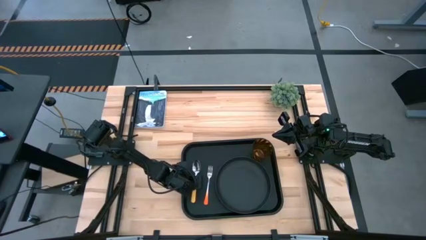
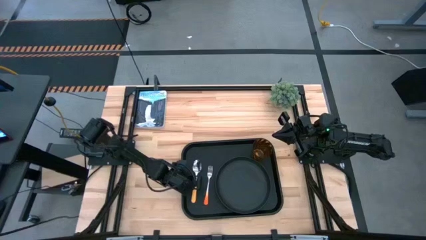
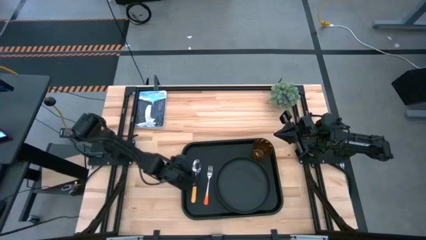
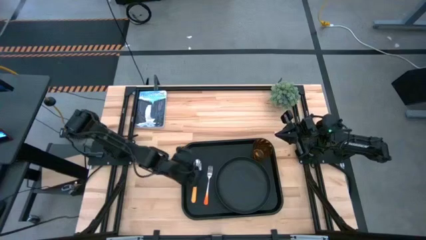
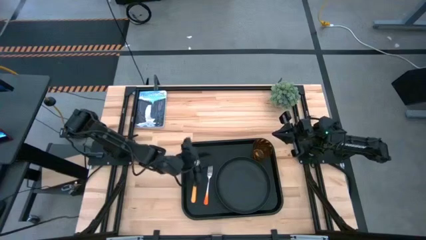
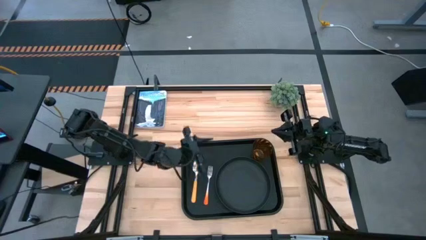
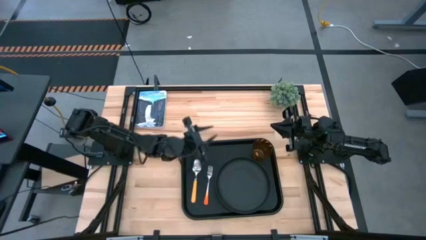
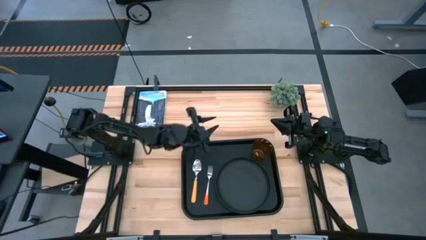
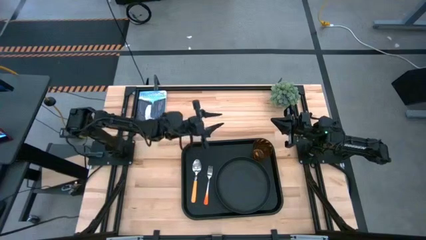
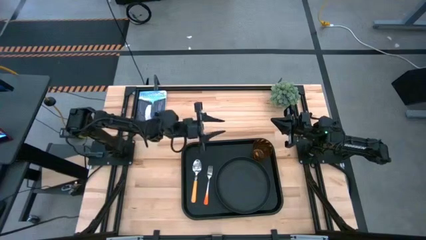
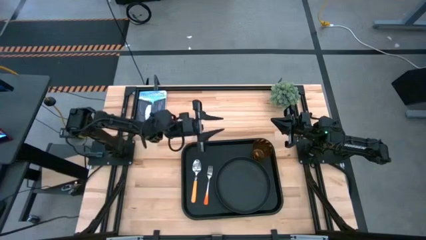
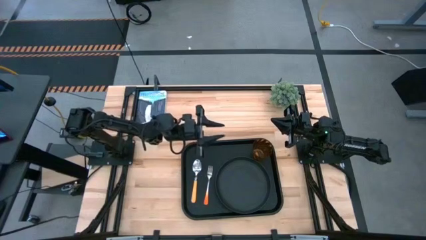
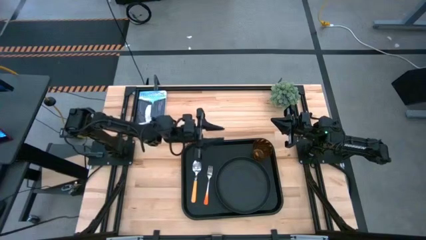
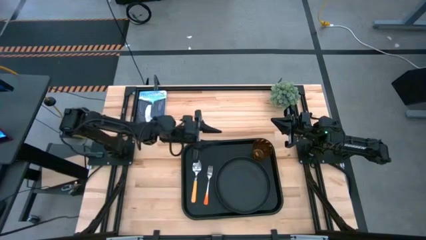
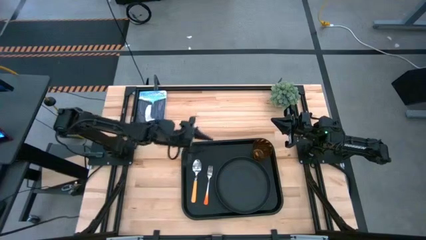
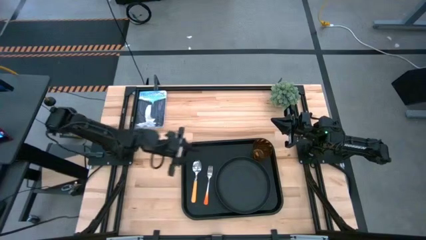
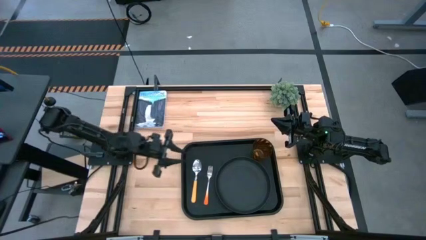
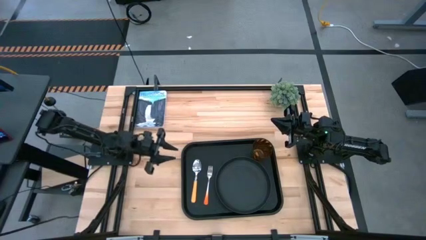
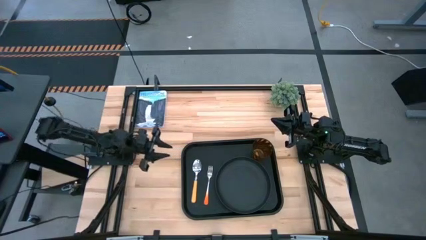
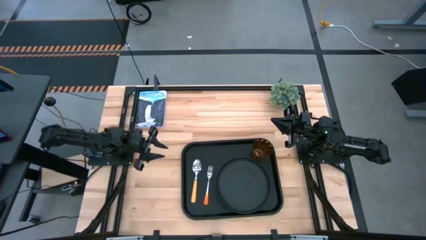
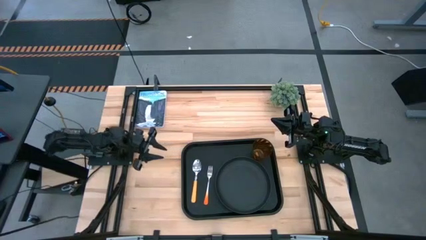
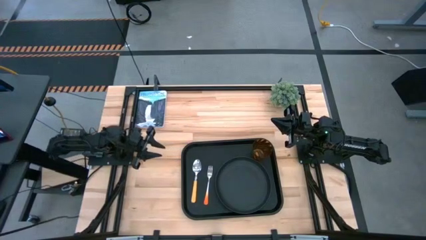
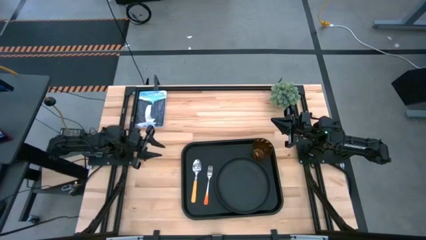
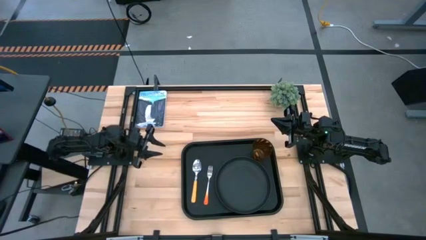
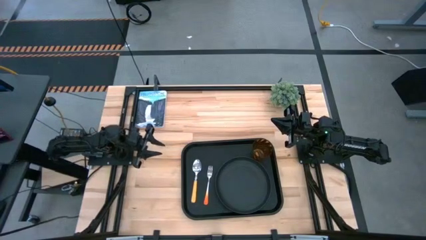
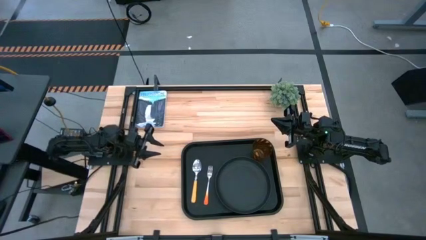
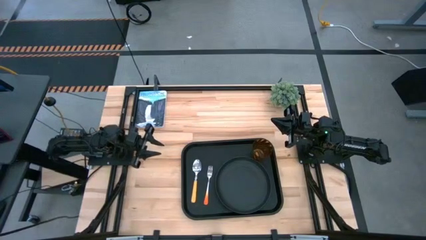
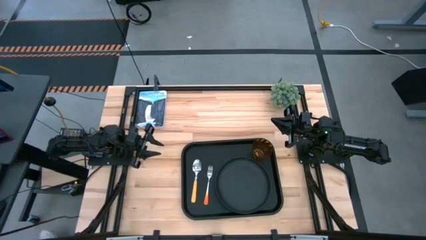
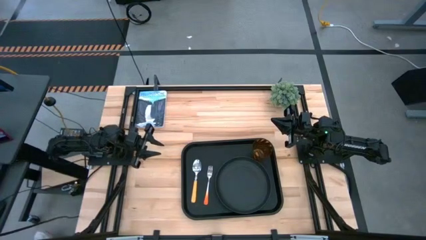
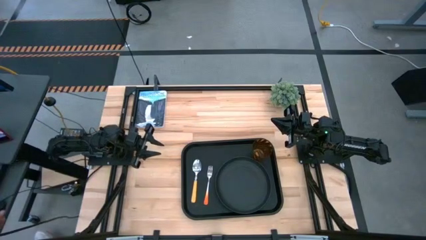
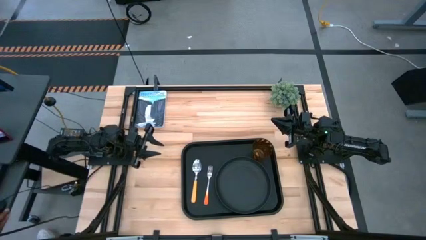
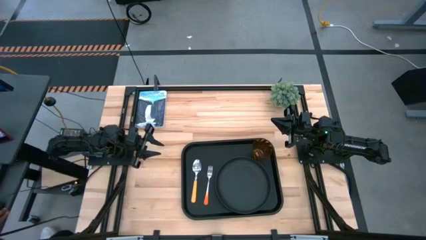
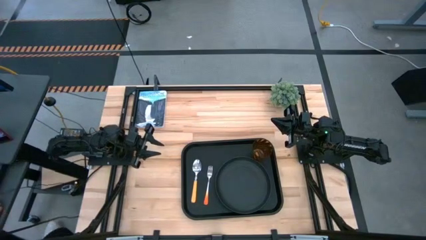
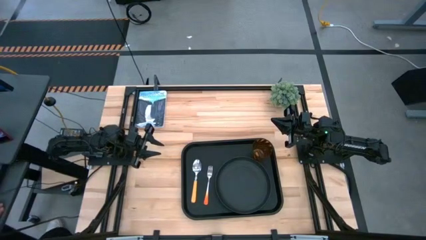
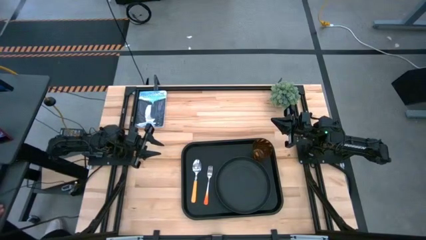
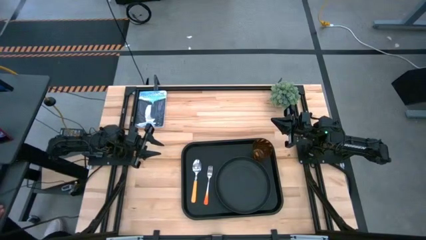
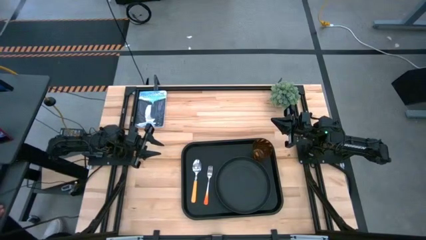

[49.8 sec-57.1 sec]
Task: Pick and place plate/cup/fork/spoon on tray
Return to Home Position

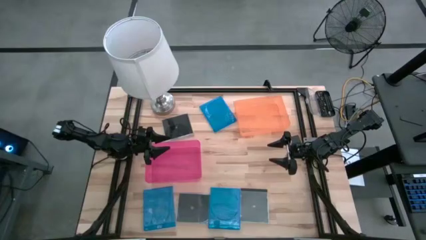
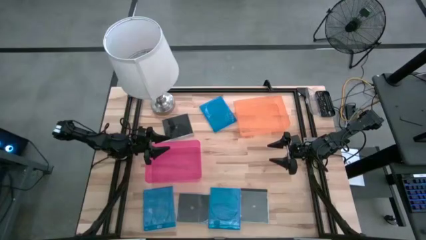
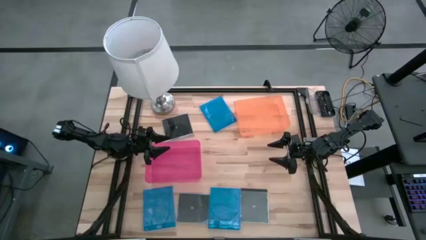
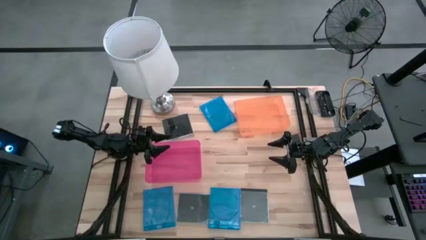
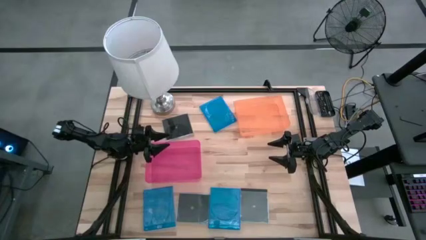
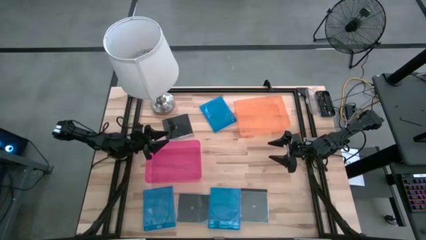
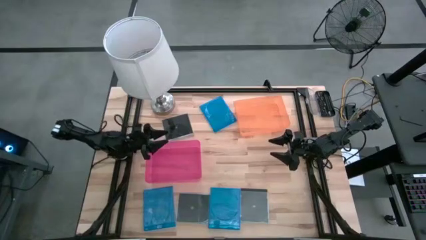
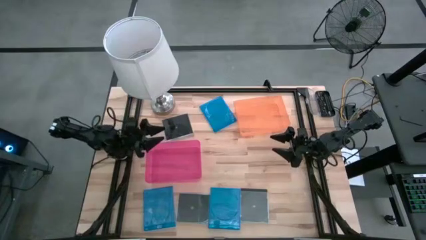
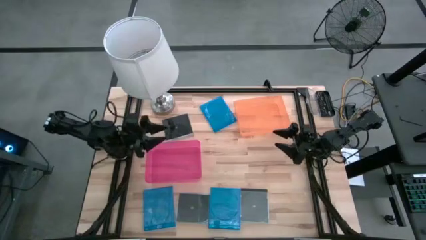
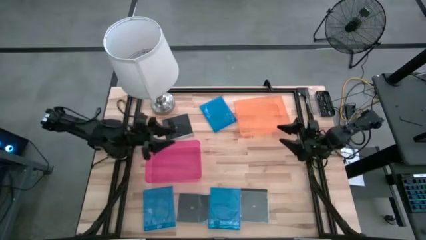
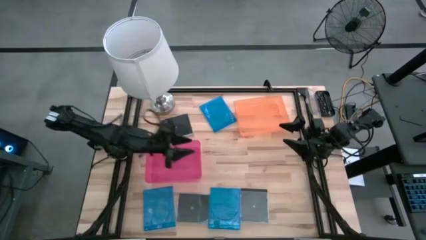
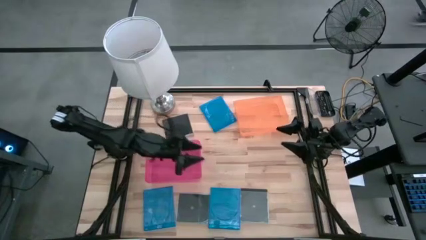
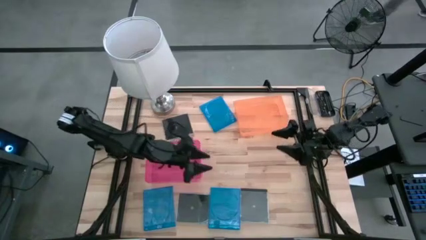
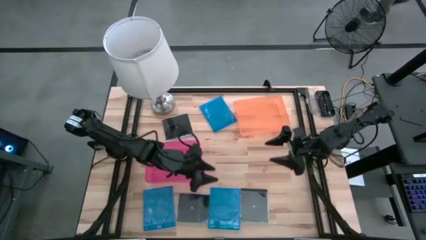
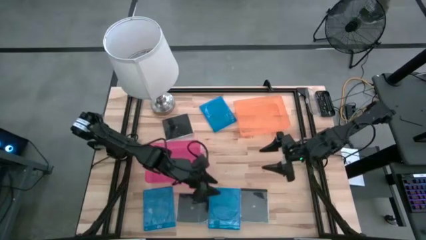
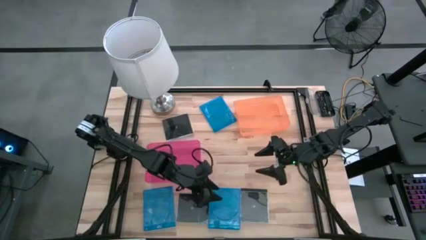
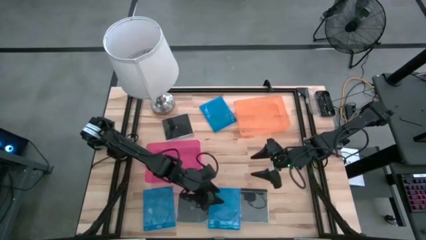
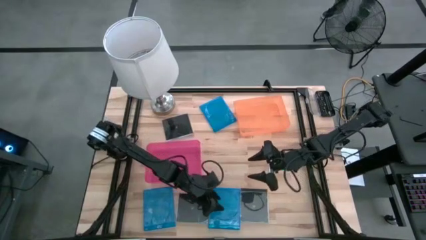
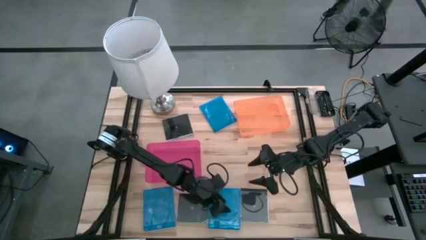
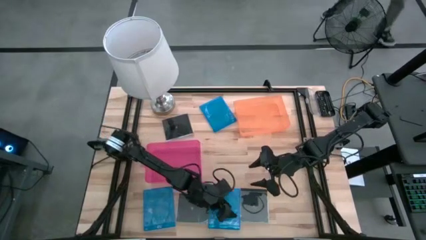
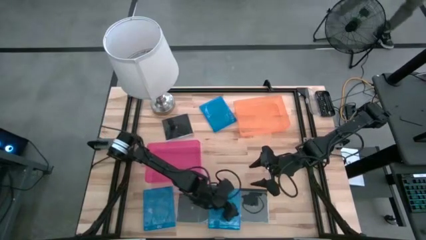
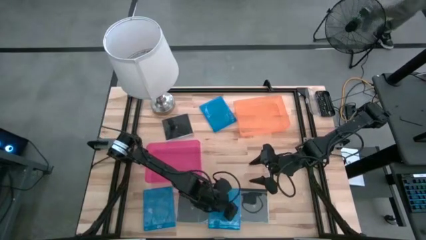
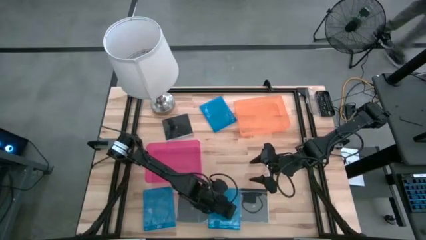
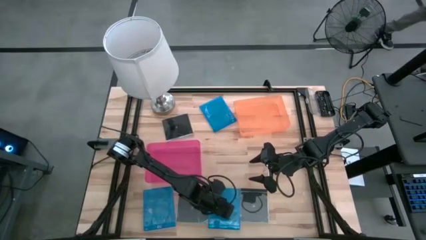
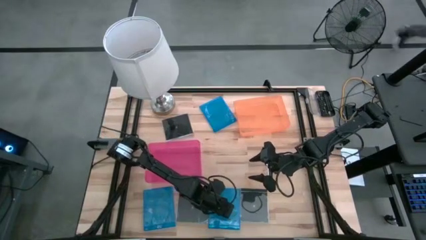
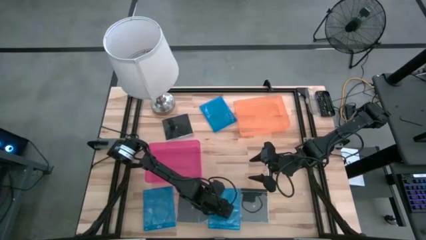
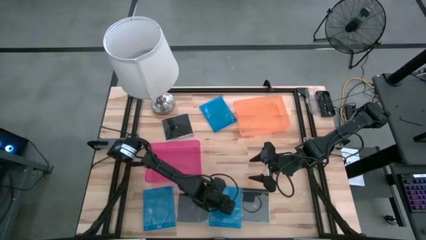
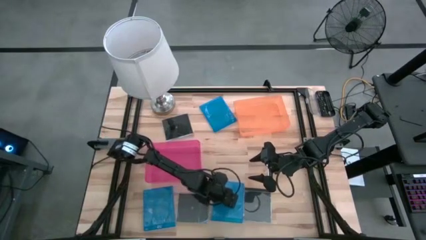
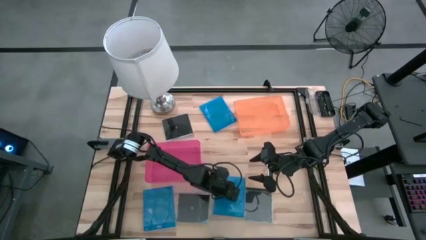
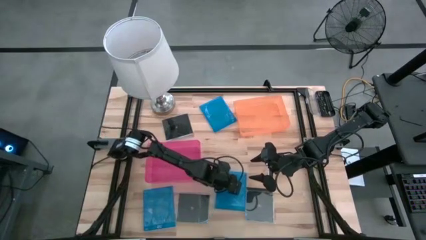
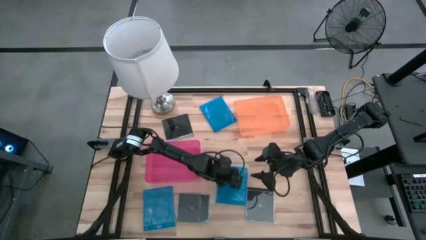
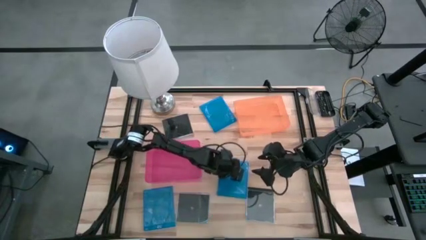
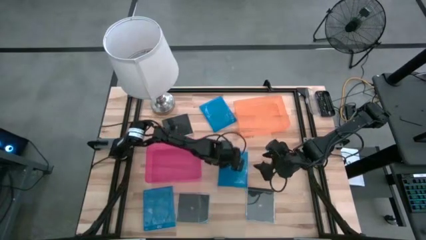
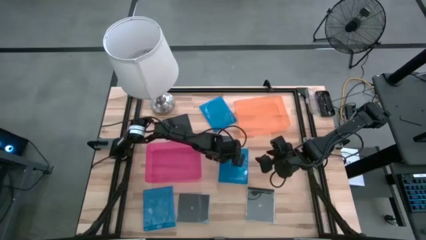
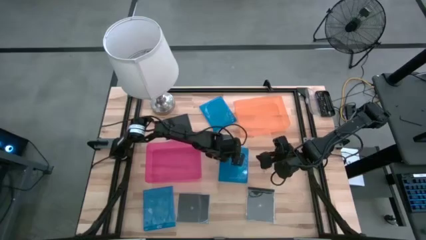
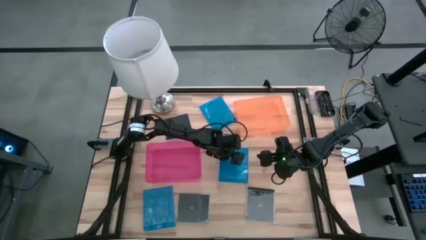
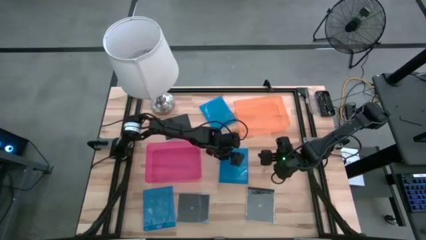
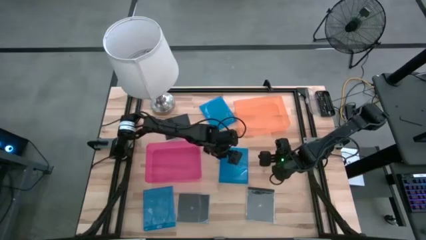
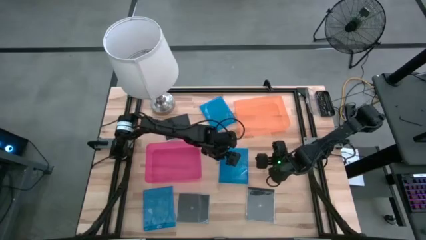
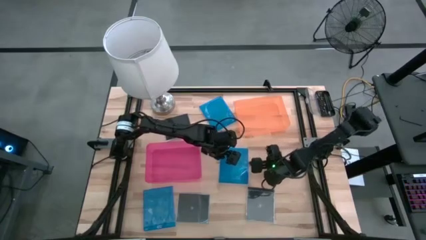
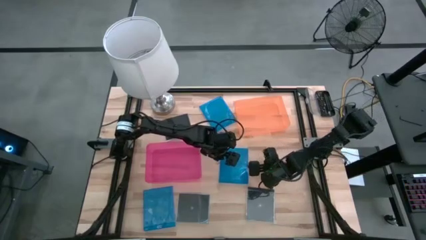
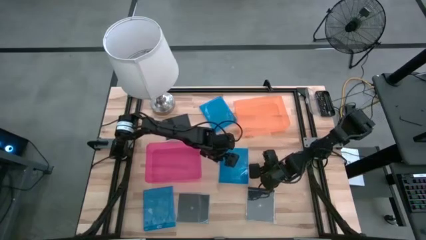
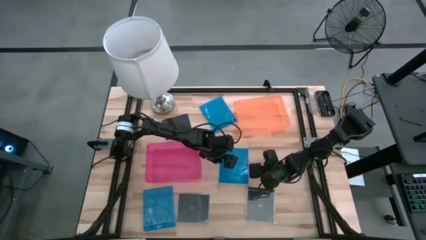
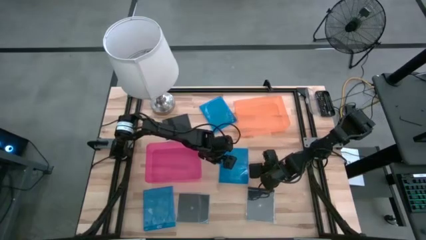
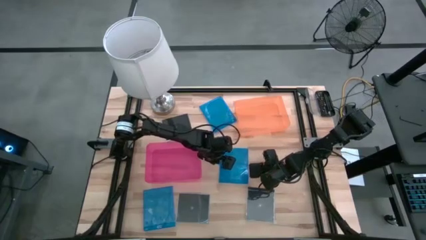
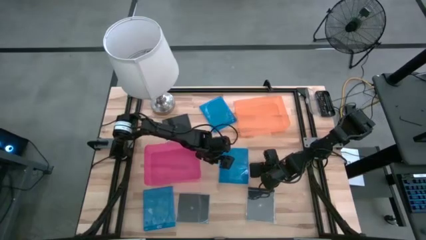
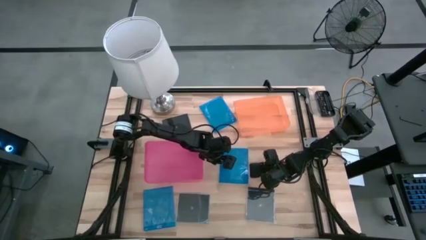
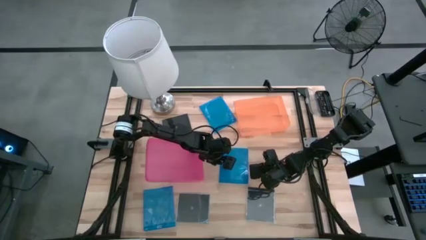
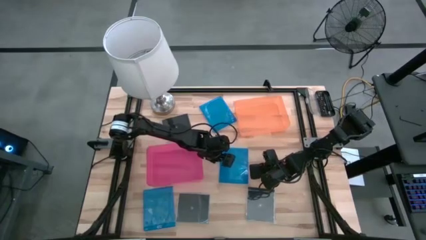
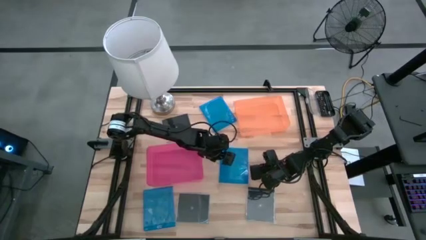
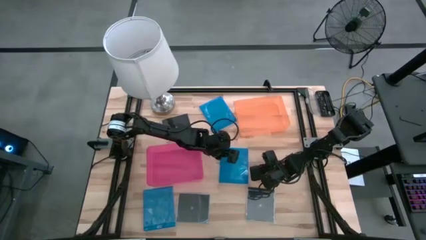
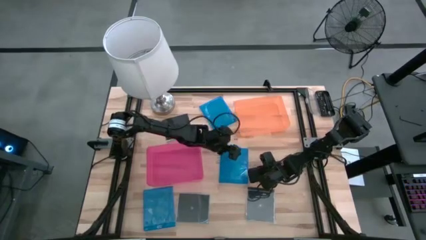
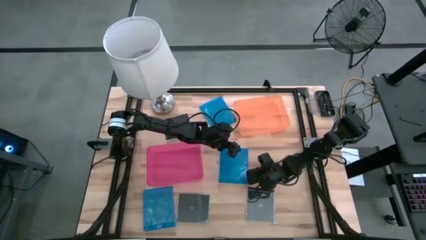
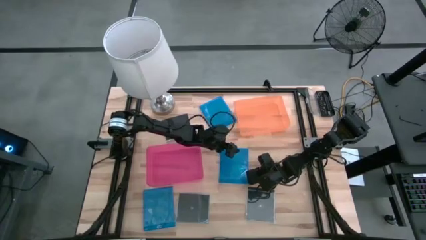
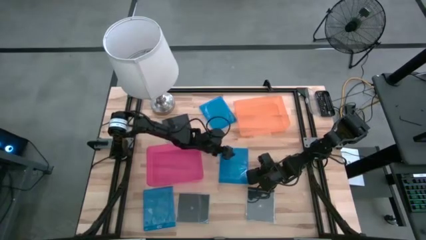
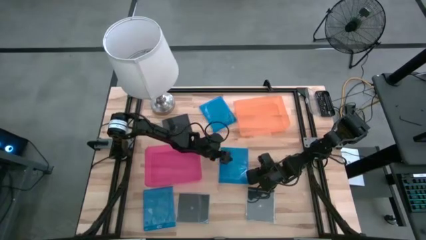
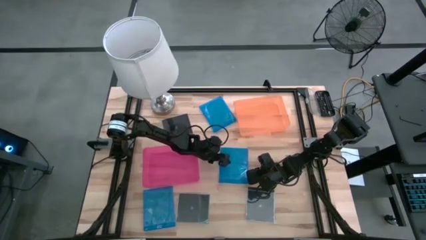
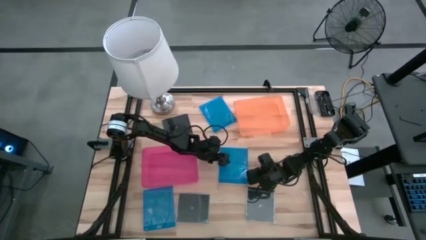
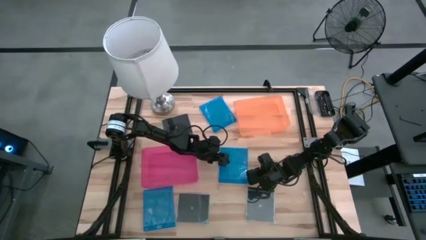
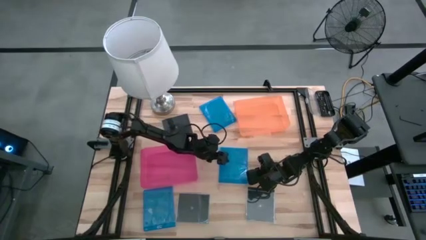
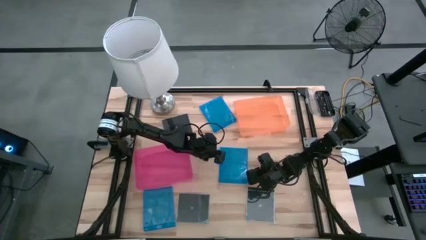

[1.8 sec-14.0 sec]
Task: Pick & place jewel cases by type
Put the bottom right blue CD case into the orange bin
